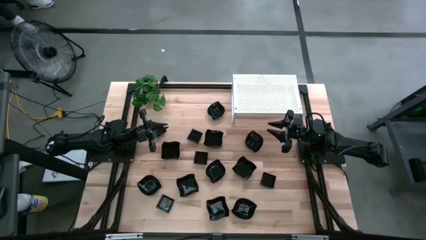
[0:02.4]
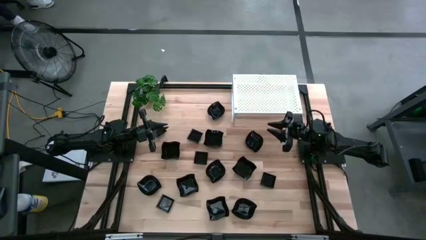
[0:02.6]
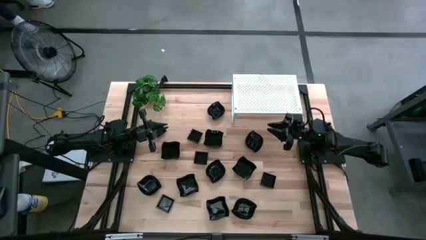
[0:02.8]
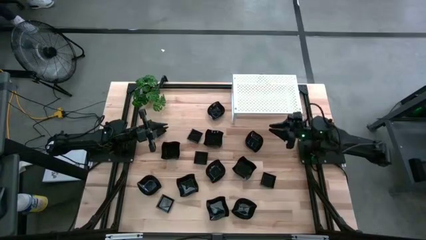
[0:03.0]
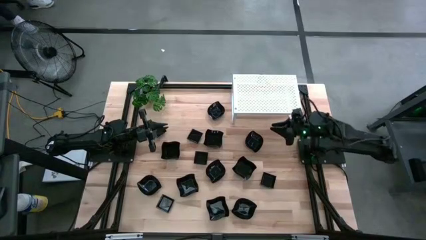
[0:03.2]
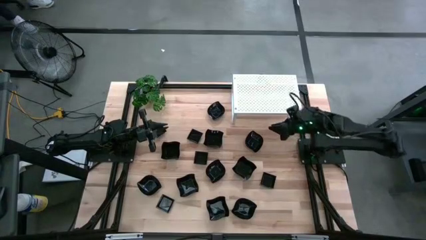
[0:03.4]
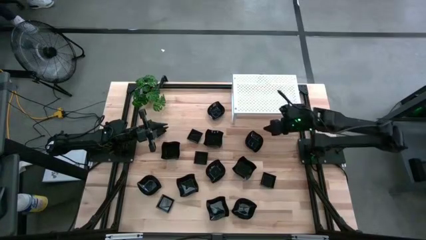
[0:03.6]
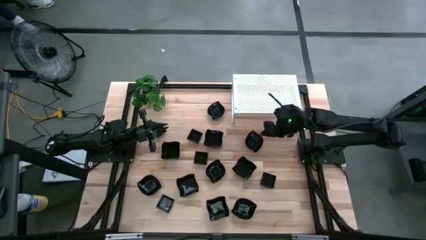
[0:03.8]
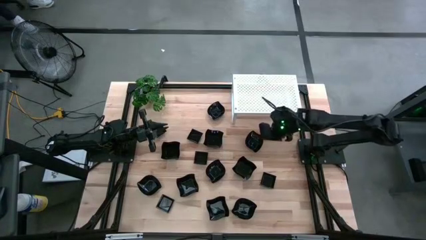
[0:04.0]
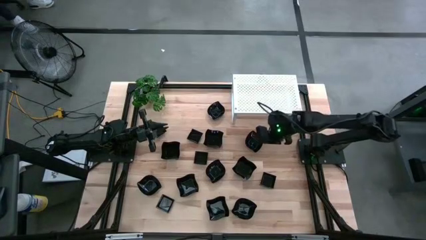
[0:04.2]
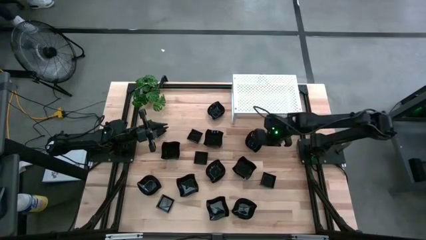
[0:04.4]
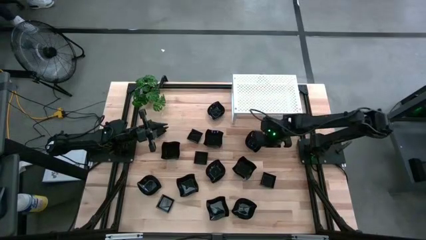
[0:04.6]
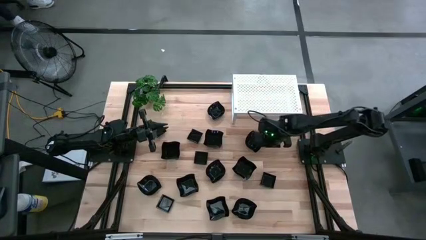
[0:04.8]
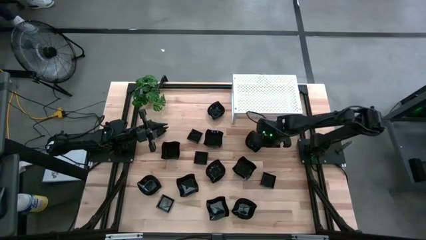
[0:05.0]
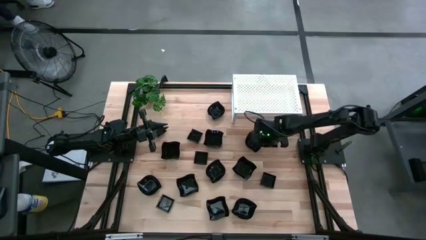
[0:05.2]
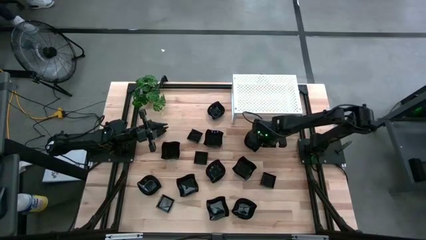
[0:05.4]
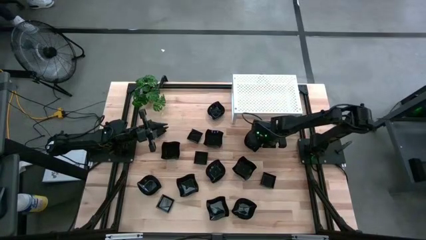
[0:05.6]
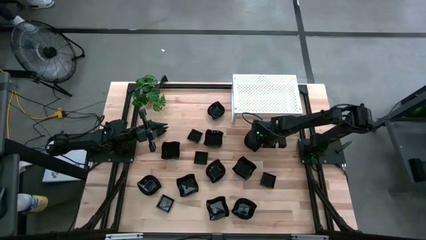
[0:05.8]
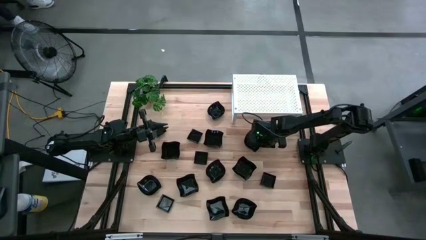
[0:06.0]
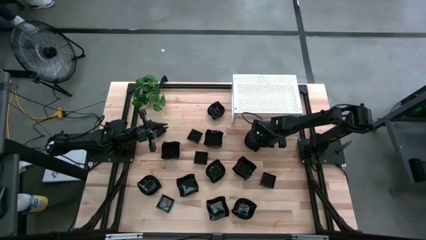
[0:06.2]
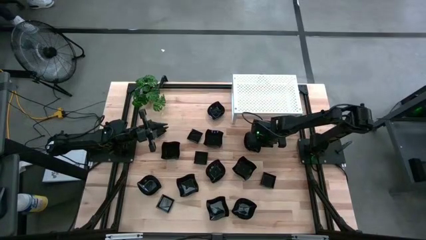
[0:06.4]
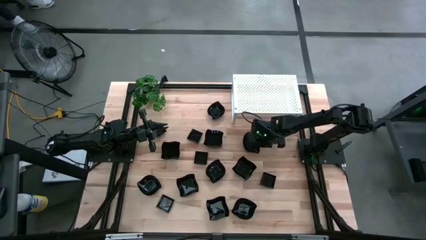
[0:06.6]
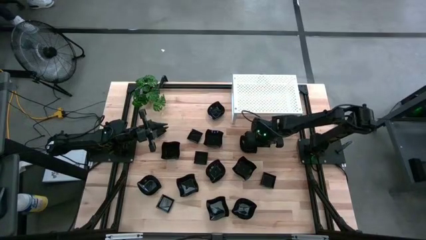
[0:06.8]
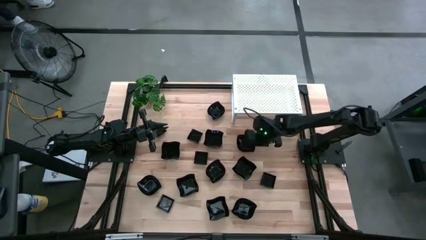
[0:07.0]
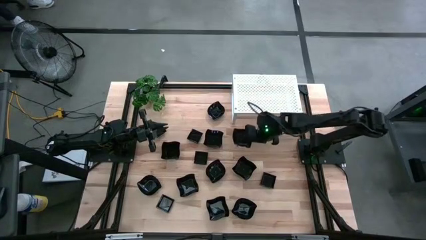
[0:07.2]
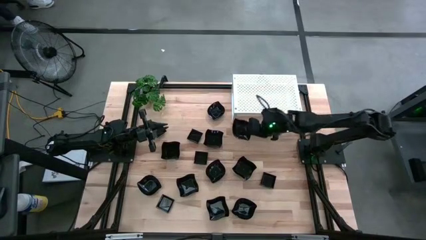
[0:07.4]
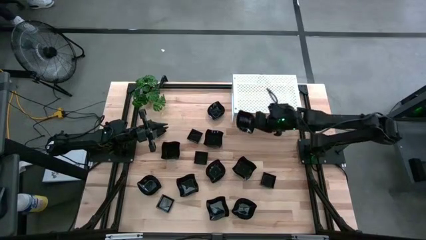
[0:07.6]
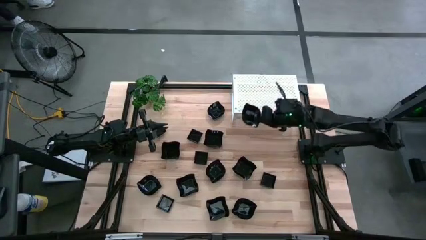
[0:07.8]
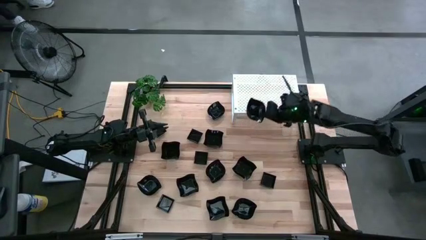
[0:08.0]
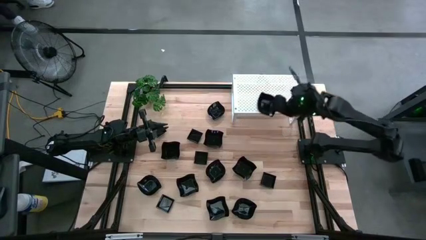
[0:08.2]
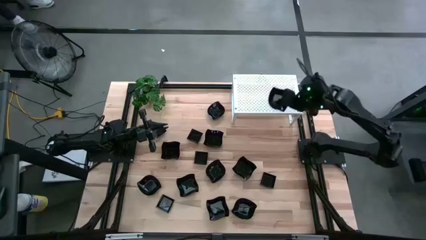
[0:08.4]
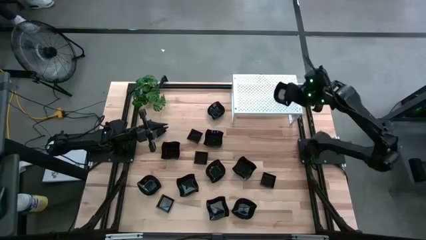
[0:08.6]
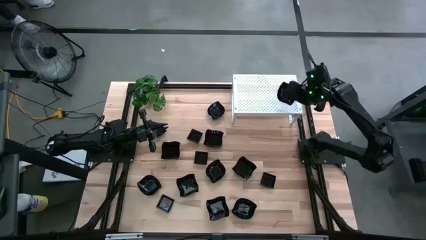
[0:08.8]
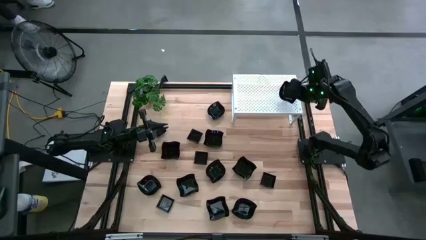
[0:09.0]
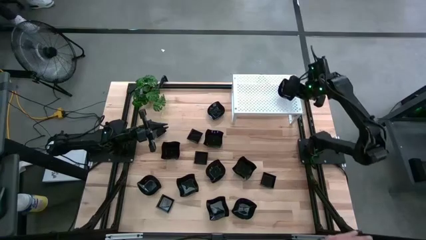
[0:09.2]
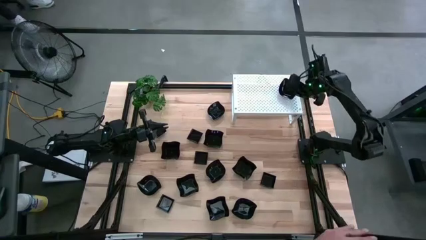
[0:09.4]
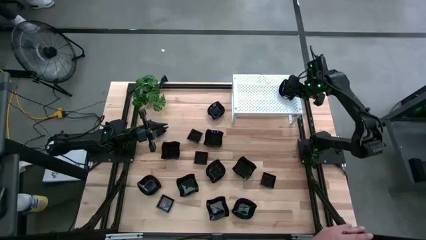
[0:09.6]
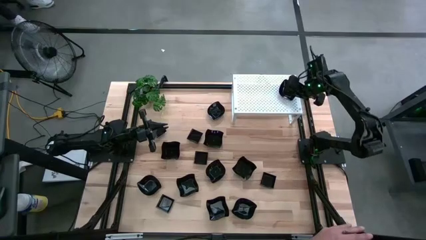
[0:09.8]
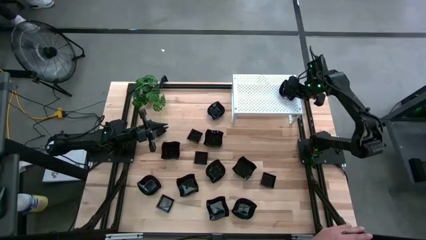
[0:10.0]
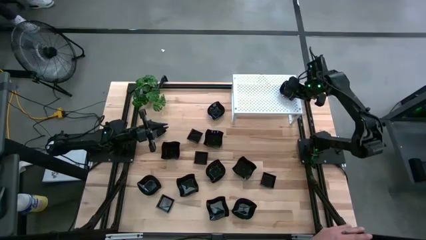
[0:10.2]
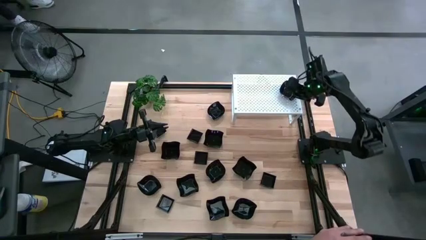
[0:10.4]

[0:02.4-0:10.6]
Task: Pick & Place Mini shaped plates
Put the leaf-shaped plate on the shelf

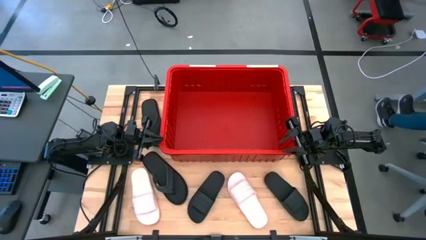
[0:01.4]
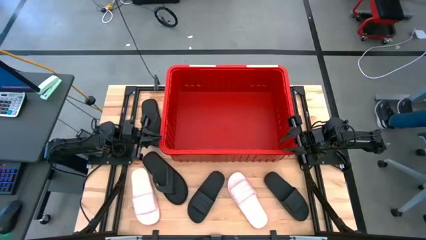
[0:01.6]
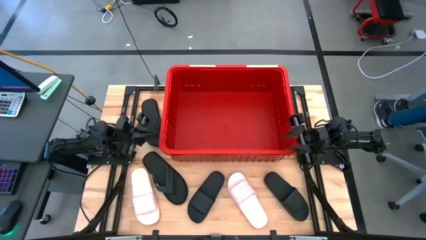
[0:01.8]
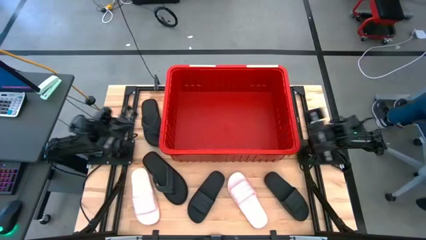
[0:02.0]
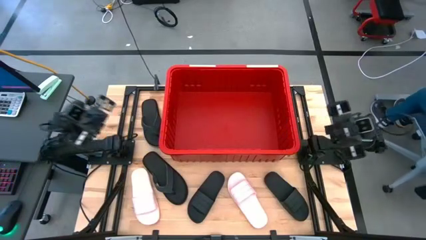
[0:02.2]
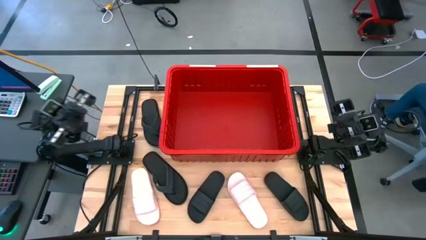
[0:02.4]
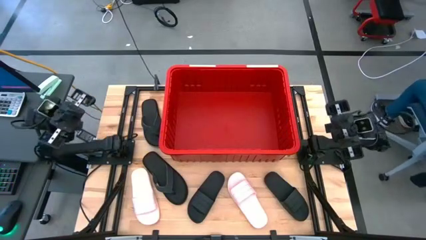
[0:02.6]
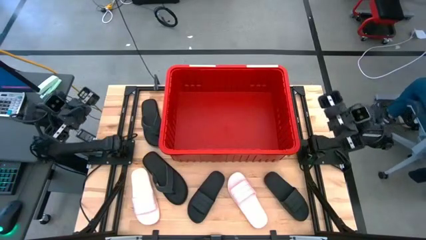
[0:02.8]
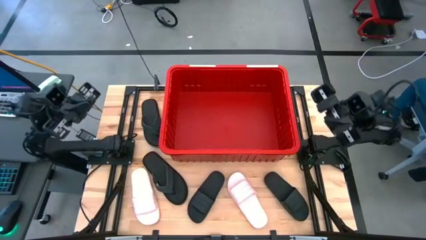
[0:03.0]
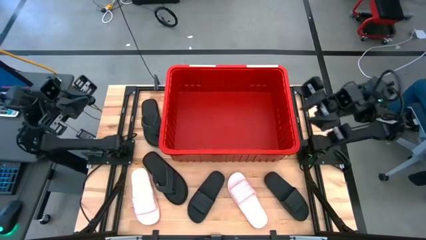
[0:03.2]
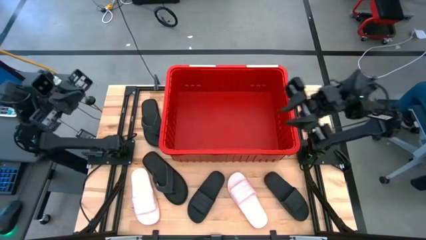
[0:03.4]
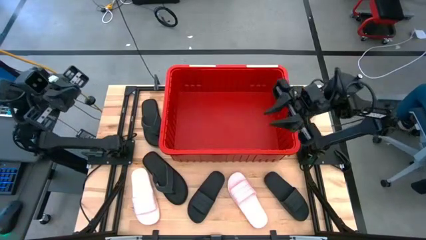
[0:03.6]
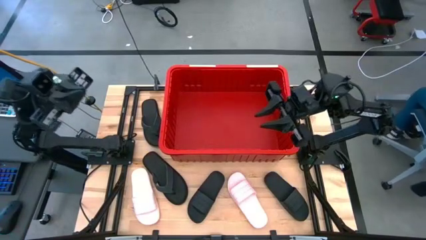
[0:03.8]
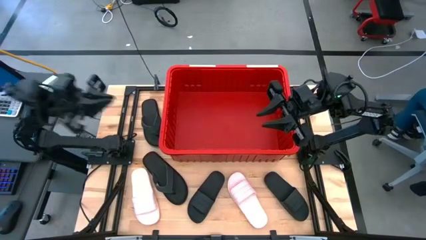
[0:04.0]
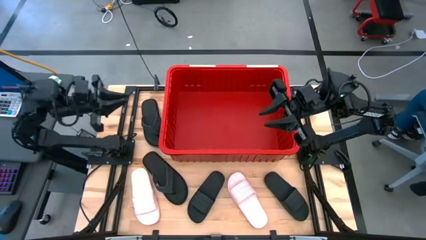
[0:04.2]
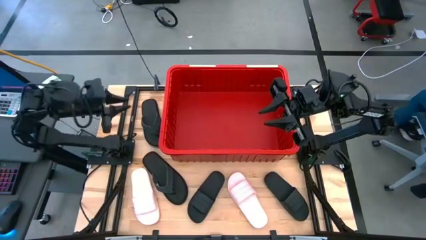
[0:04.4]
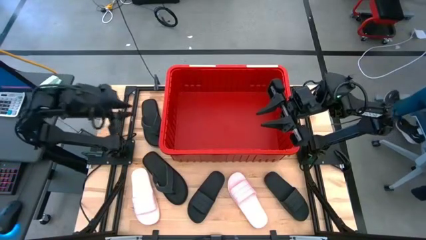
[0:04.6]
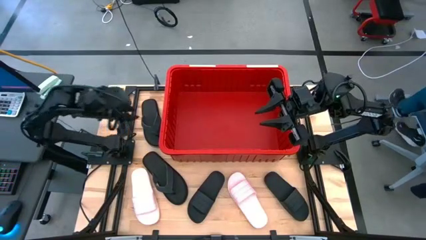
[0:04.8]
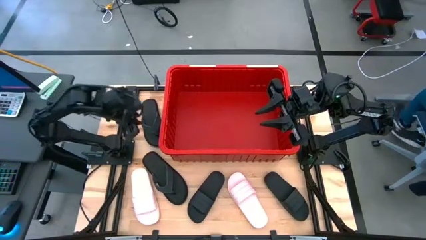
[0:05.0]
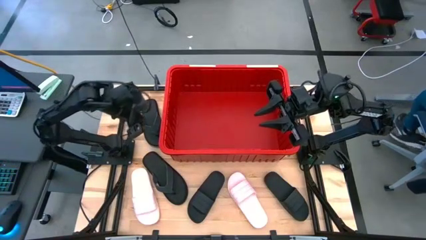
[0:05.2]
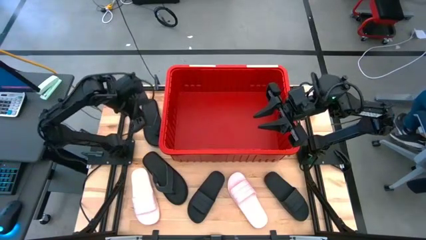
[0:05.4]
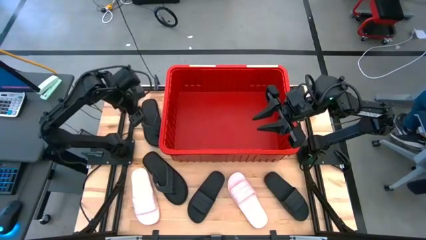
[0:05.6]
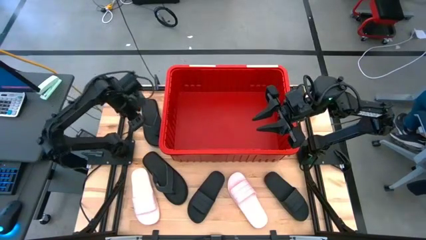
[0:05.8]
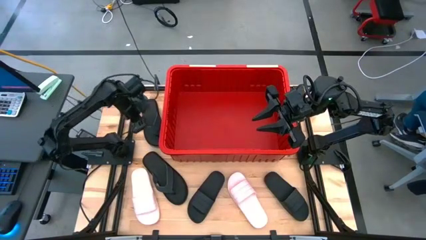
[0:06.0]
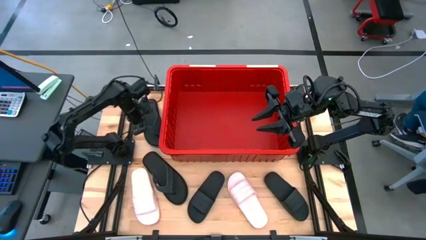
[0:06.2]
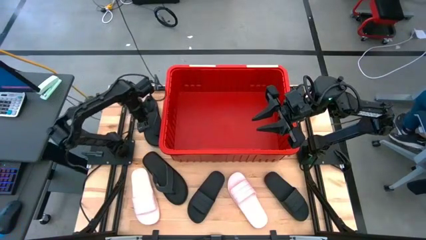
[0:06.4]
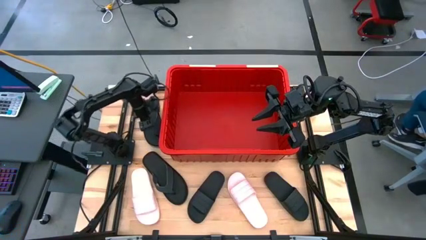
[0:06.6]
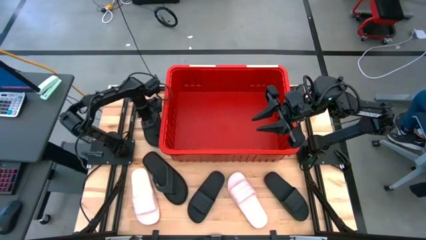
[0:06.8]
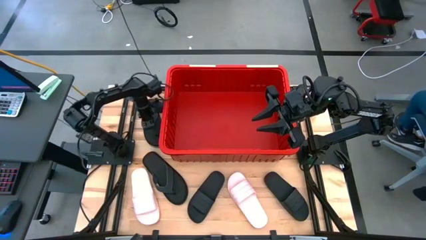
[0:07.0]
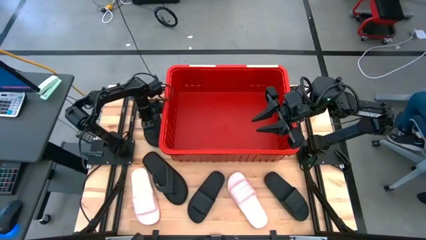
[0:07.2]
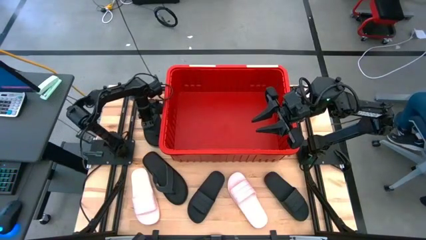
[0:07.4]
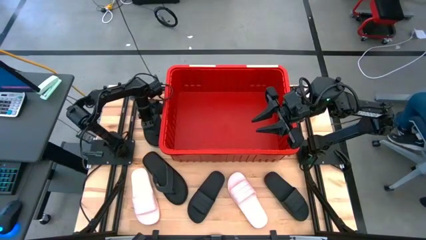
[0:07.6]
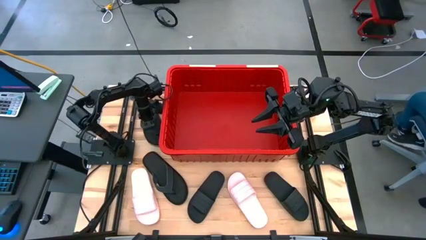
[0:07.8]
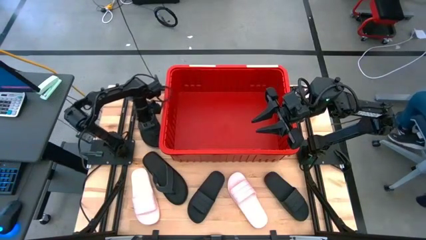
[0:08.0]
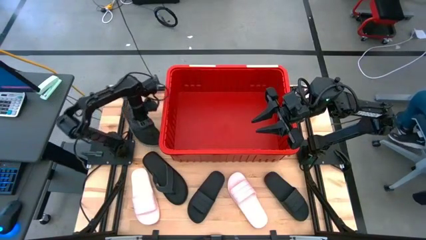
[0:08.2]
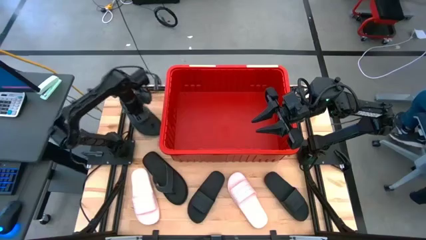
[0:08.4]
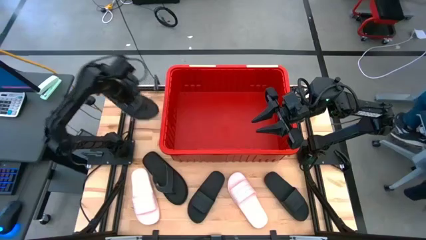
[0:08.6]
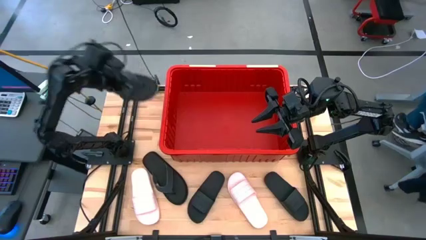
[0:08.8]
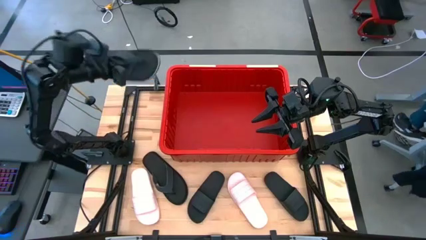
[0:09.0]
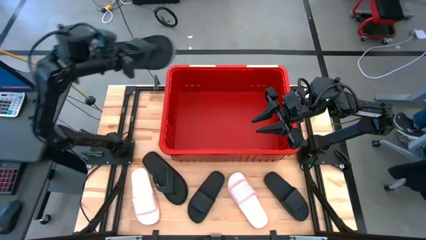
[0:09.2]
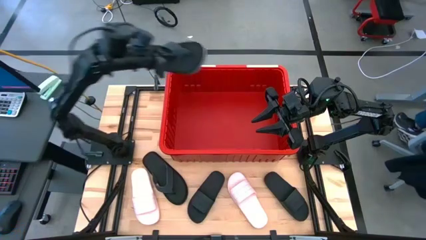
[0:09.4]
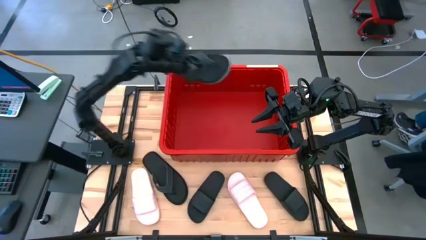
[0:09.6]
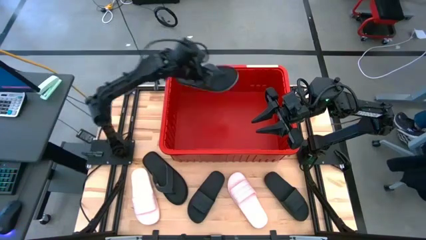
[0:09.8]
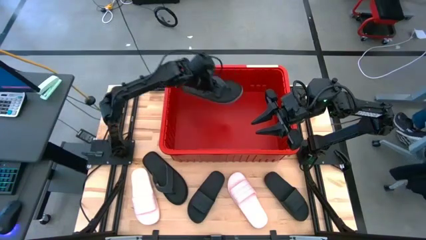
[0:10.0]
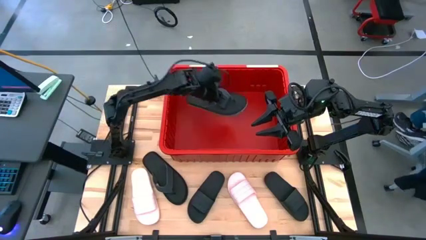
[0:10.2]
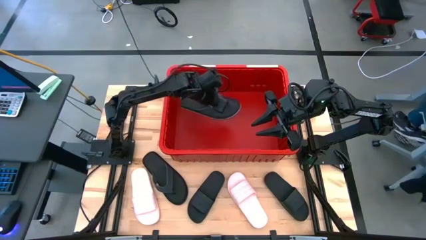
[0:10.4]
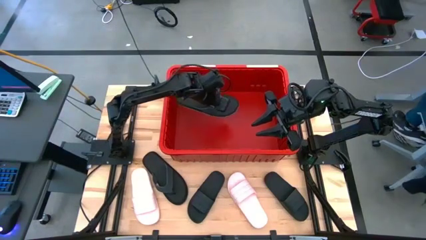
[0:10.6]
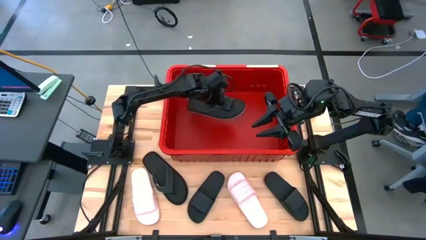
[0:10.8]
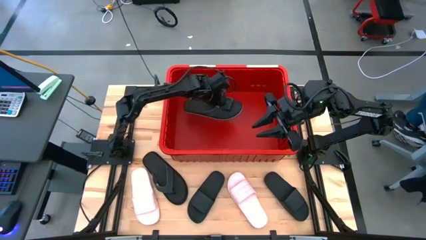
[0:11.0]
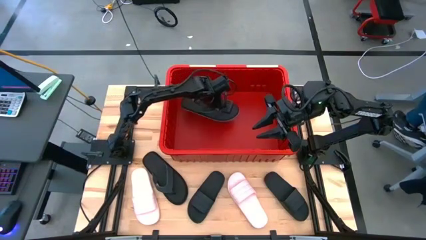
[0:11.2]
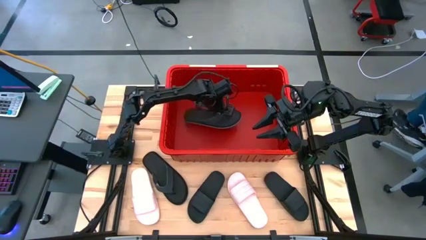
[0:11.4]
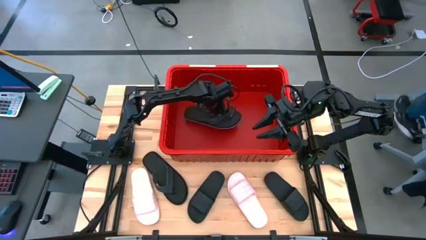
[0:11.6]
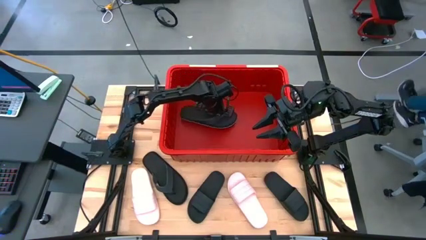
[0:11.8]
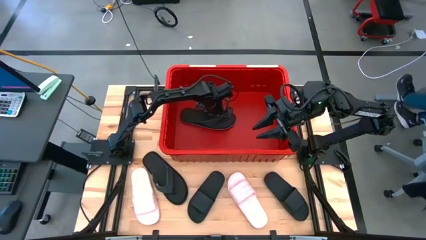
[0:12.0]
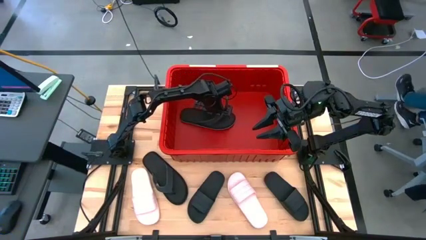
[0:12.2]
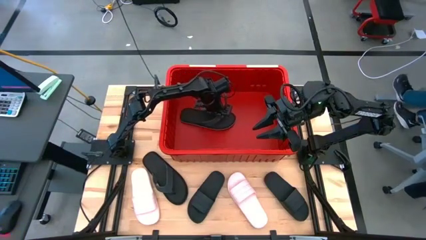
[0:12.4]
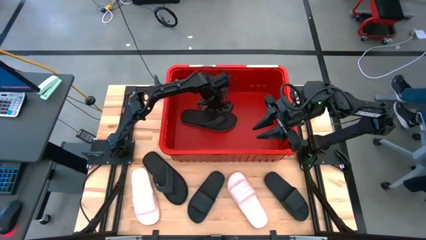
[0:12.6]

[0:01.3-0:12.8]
Task: Pick and place slides into bin
Put the black slippers into the red bin
